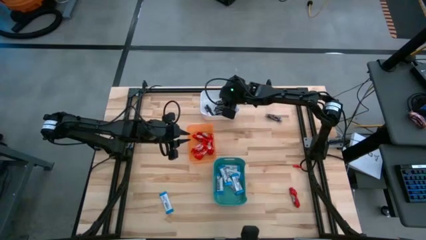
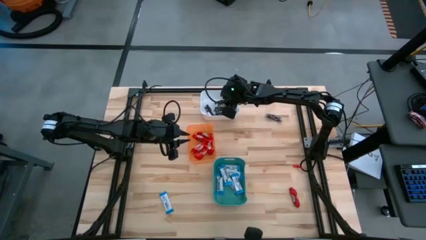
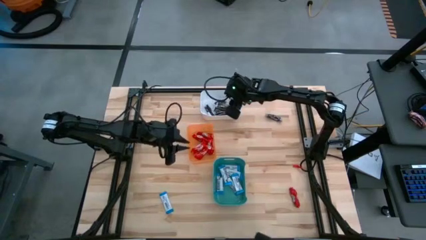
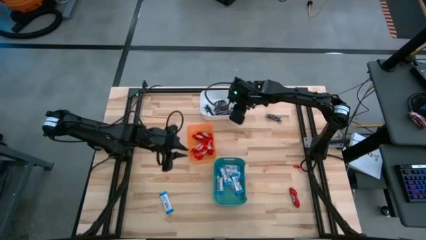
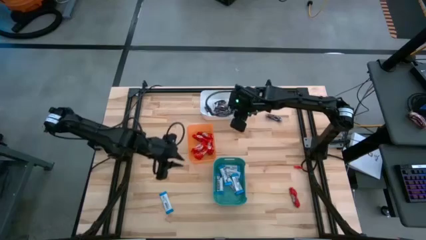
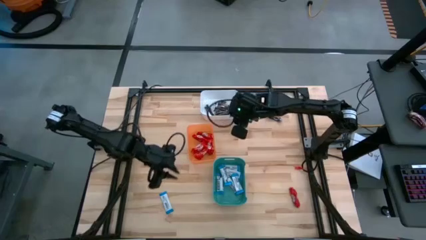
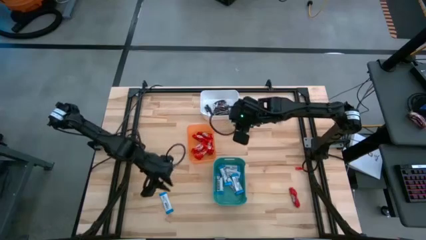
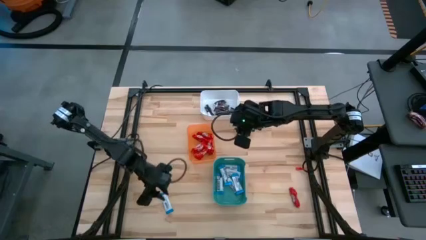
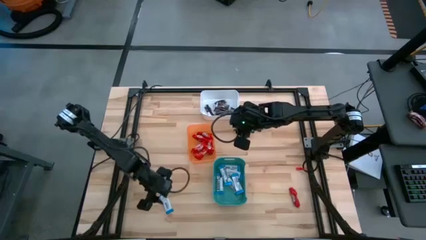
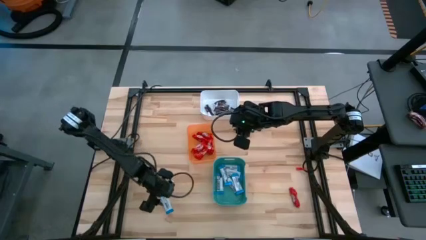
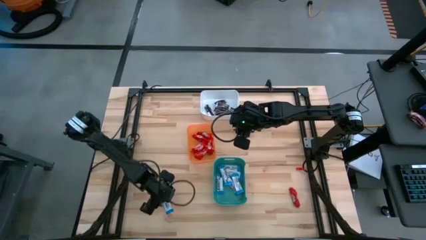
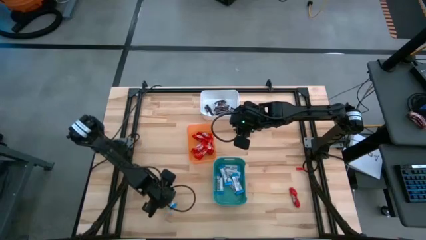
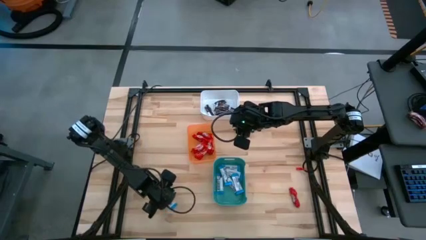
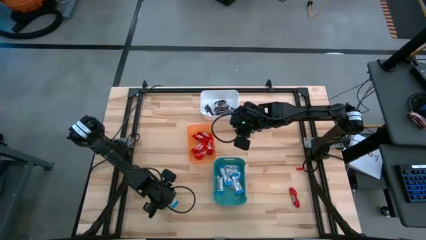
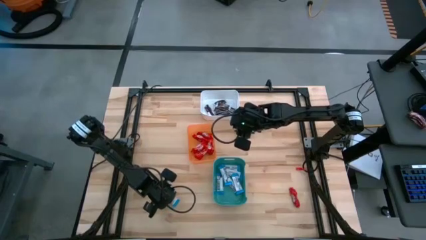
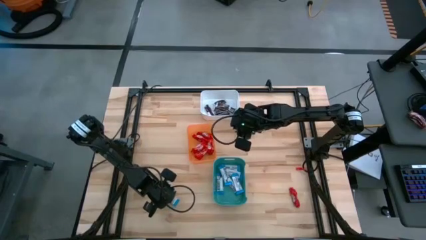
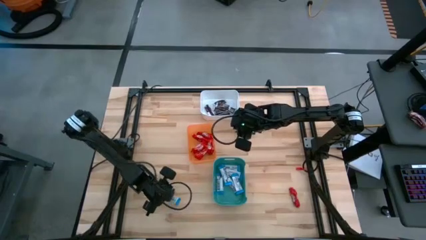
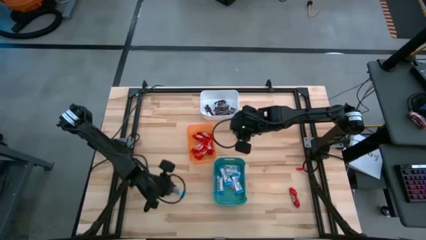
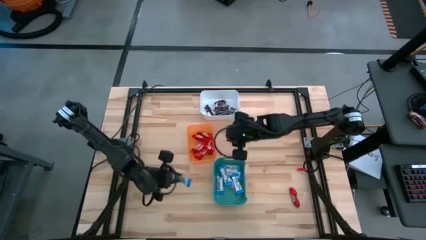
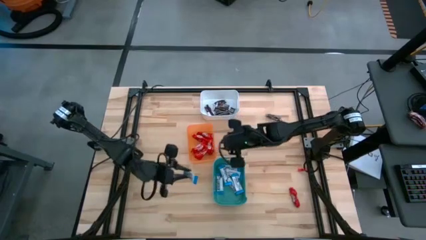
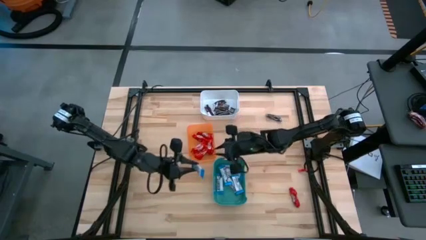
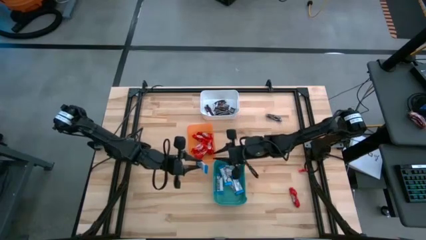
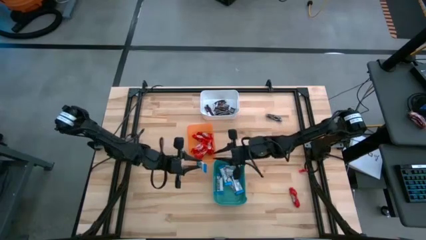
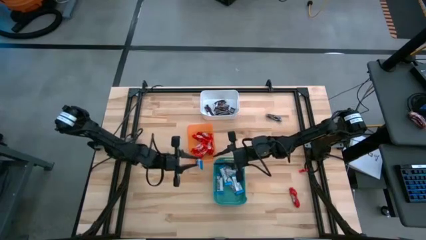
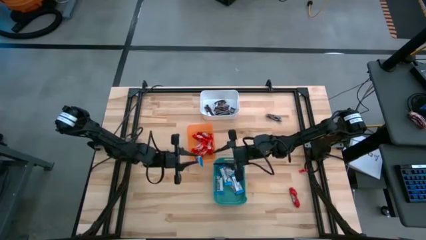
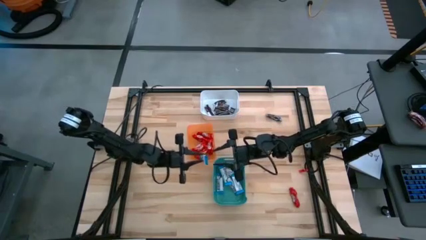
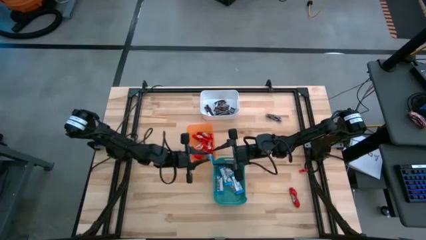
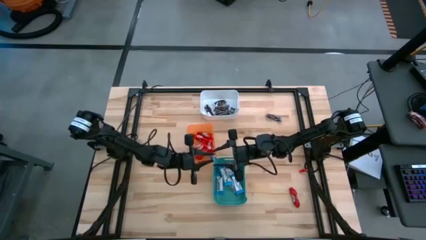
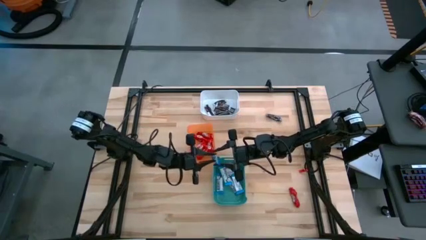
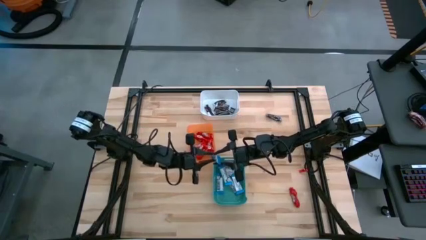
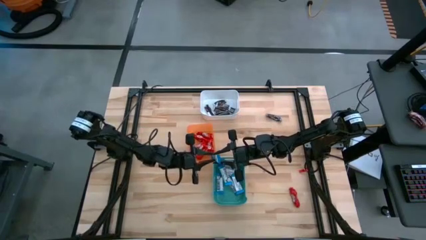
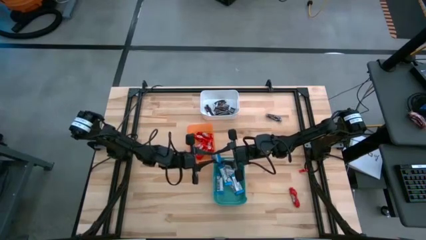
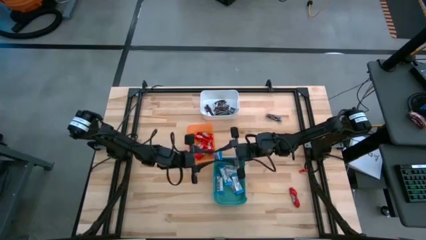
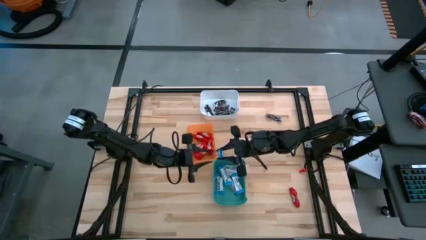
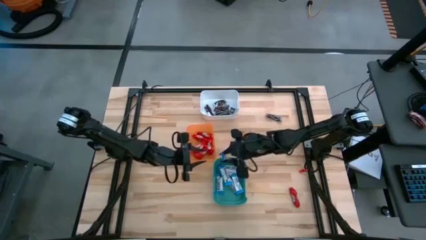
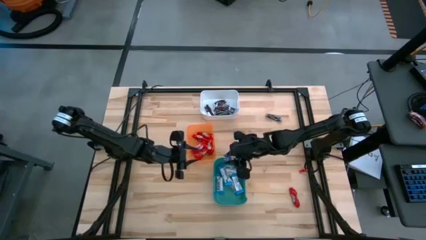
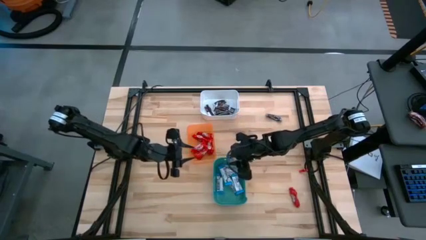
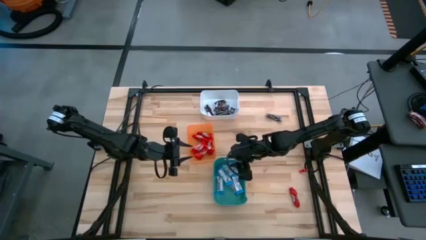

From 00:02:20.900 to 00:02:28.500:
Task: Sort candy
Put the white chocolate bar into the green bin

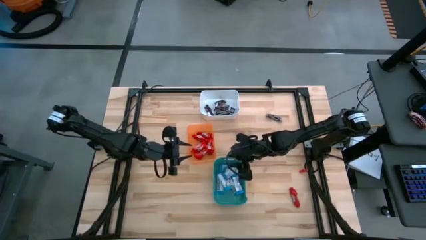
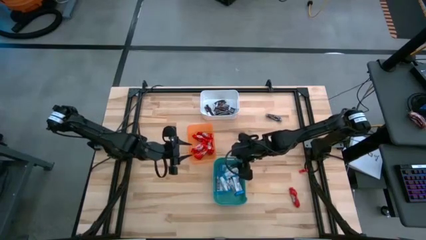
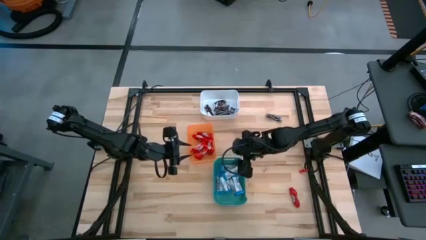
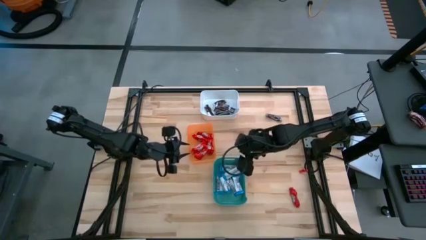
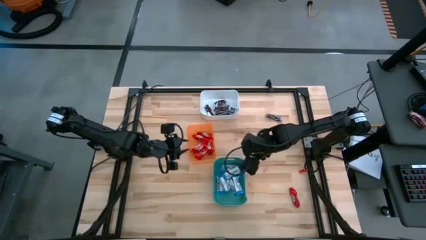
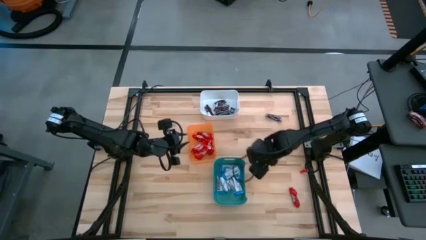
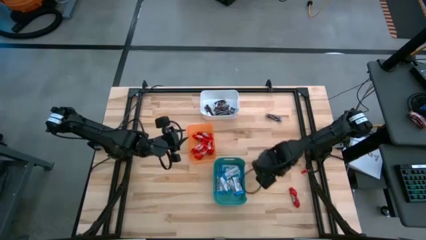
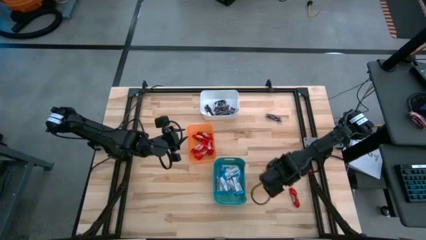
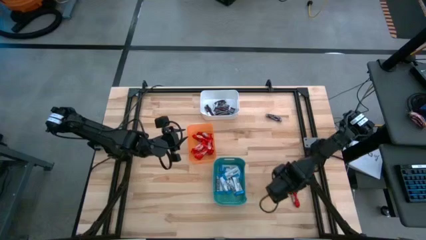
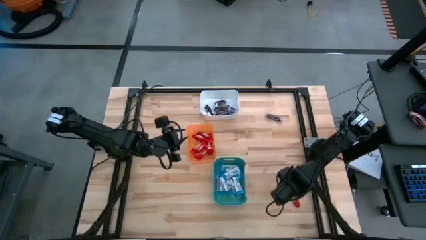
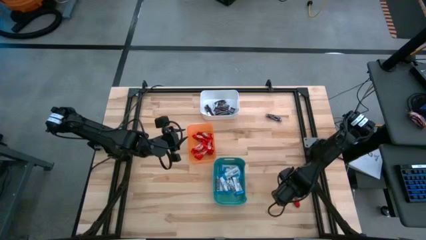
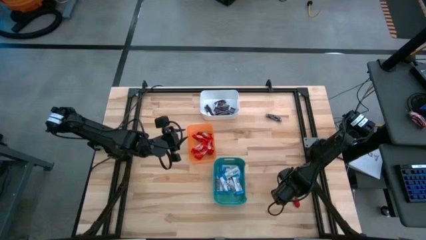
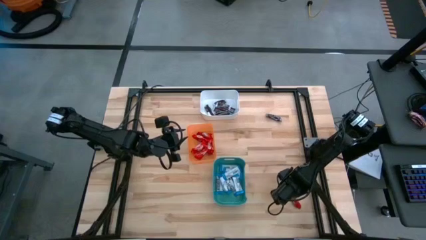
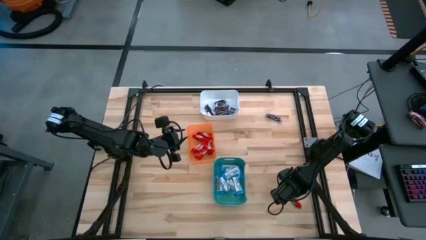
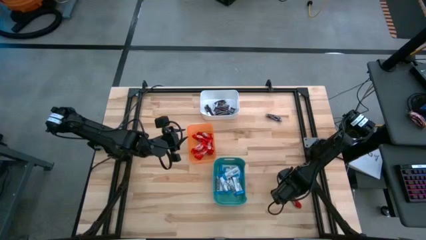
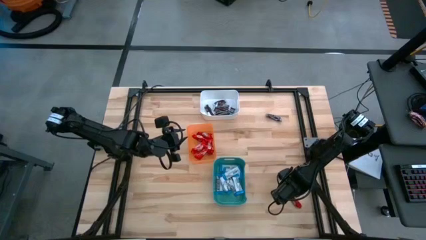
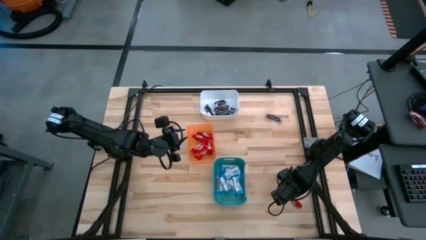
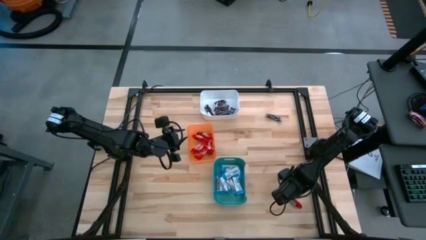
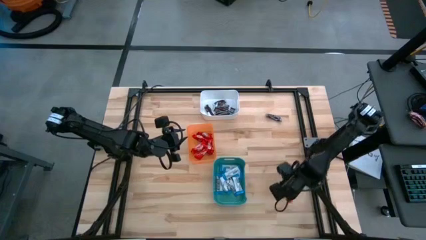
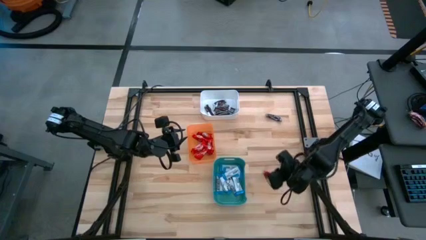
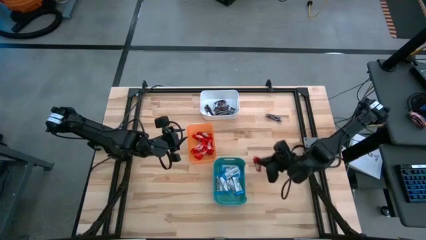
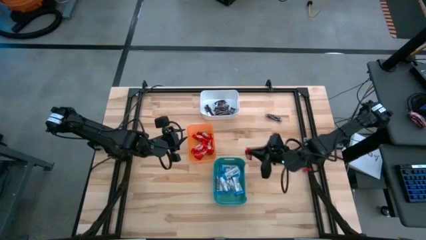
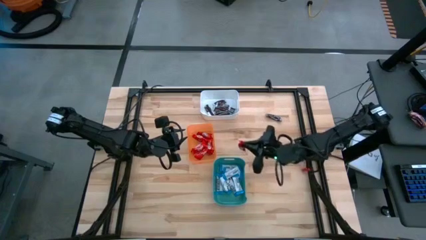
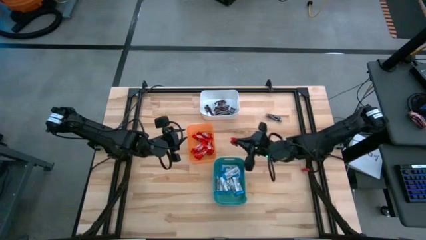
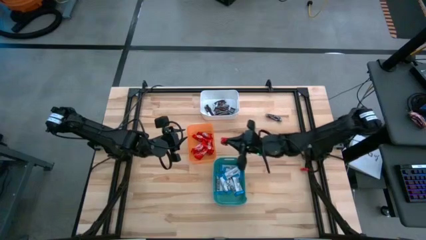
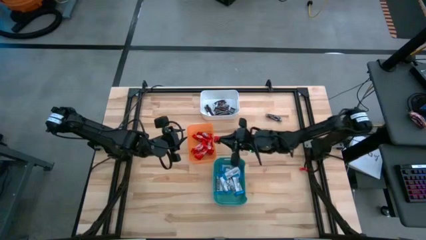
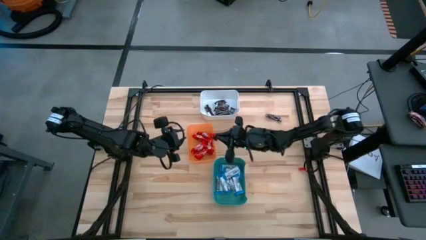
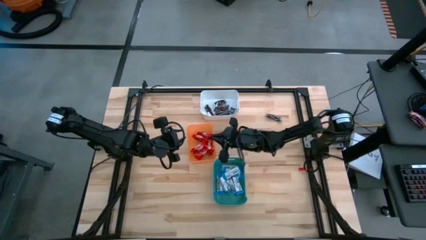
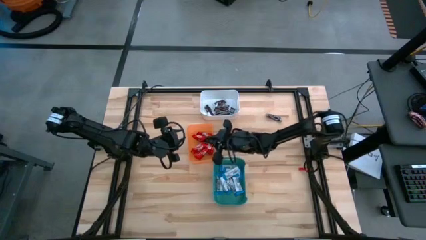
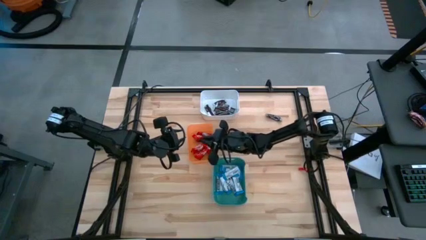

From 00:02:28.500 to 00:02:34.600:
Put the red chocolate bar into the orange bin

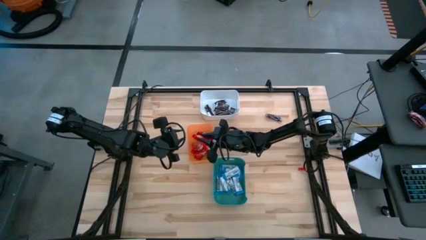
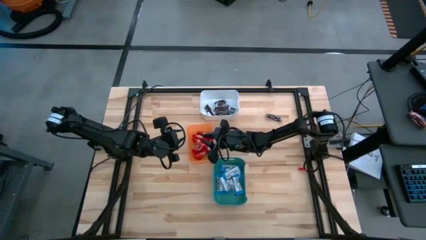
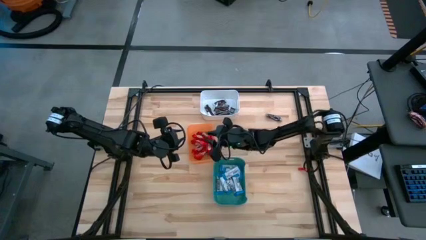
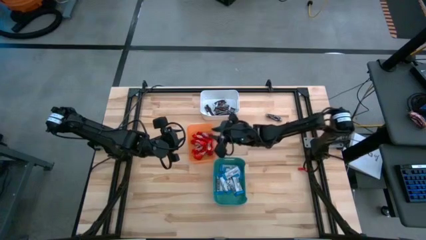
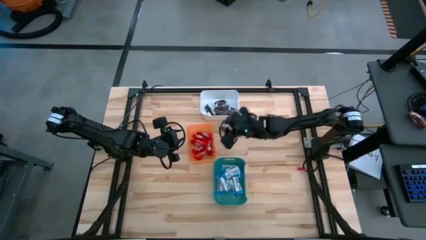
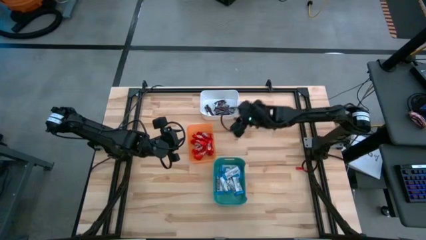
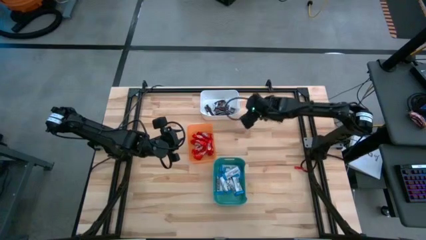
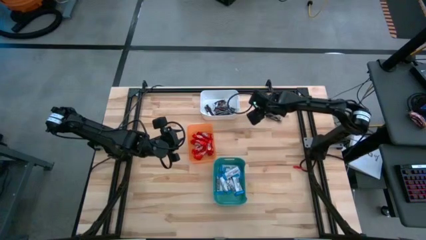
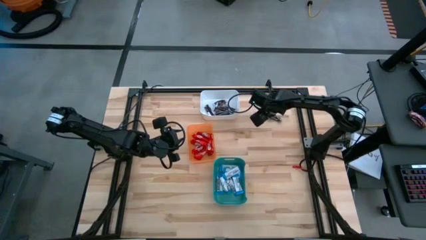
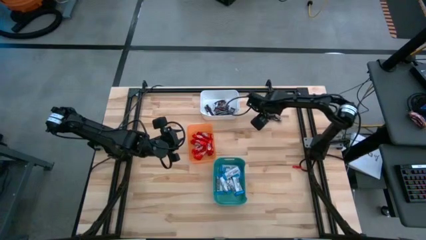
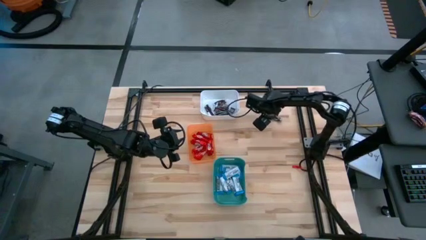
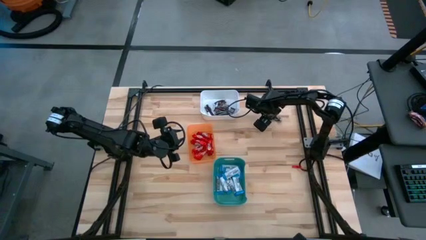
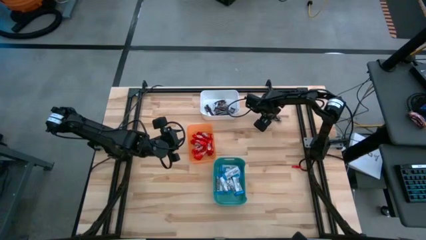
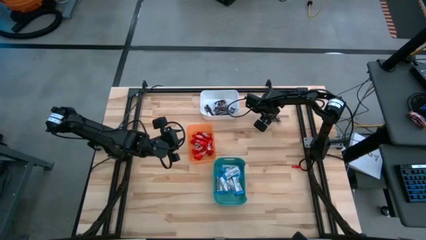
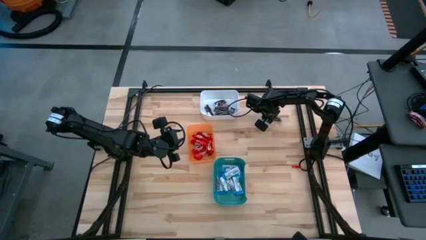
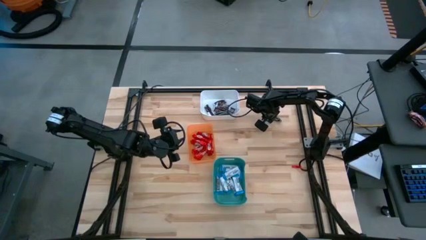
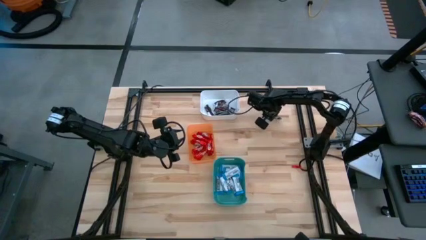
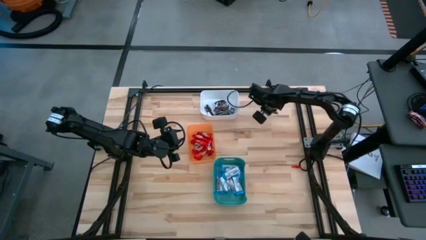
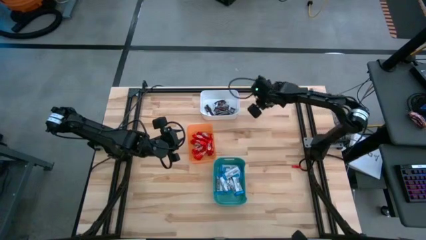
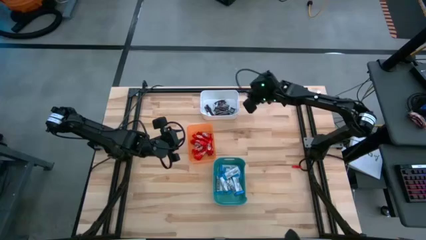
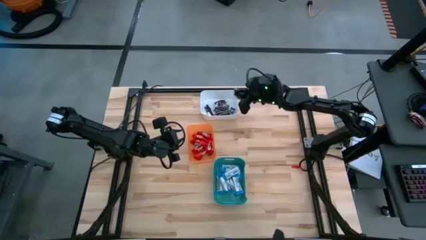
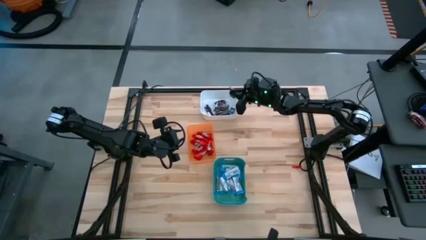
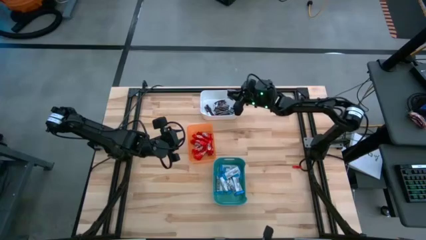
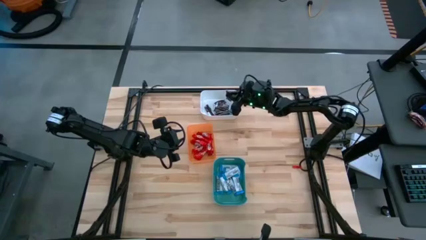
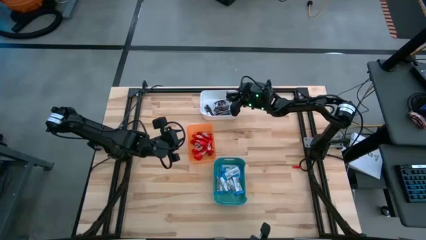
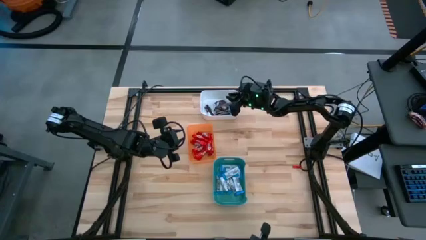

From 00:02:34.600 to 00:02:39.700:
Put the brown chocolate bar into the white bin
